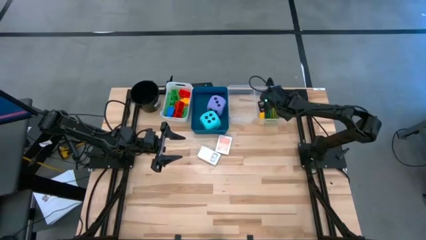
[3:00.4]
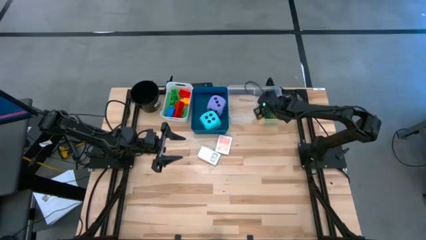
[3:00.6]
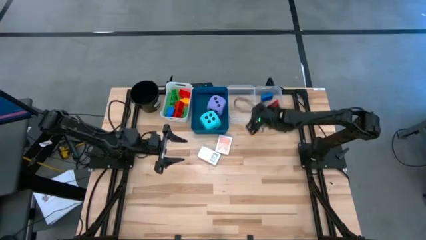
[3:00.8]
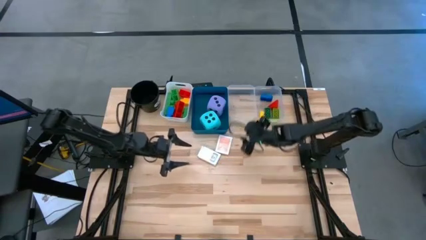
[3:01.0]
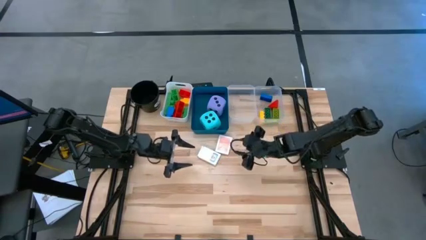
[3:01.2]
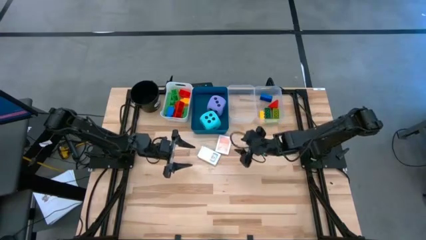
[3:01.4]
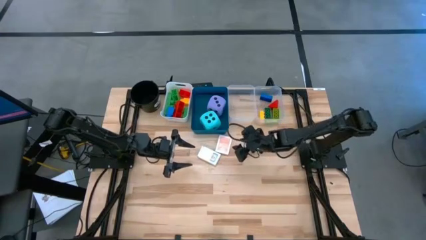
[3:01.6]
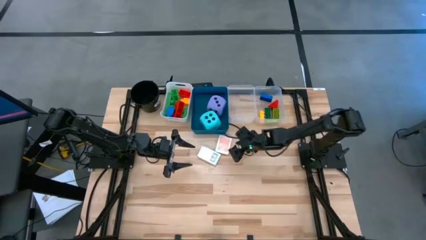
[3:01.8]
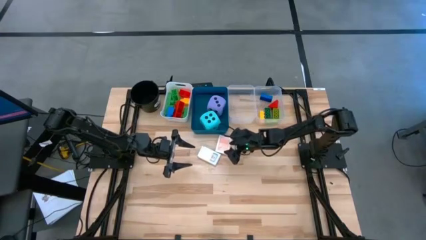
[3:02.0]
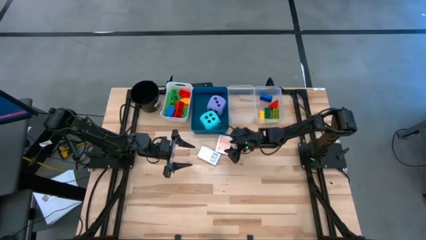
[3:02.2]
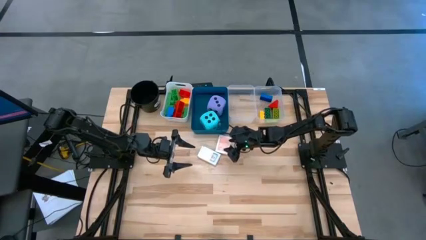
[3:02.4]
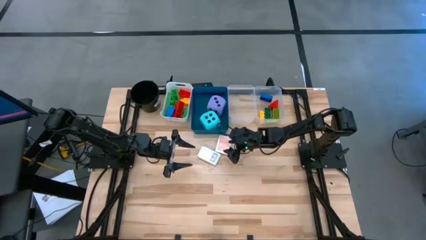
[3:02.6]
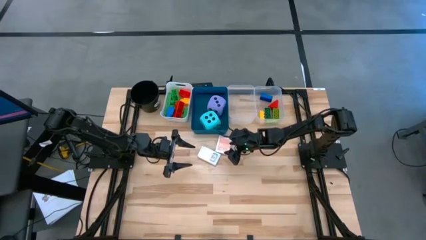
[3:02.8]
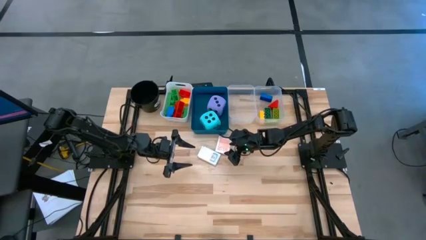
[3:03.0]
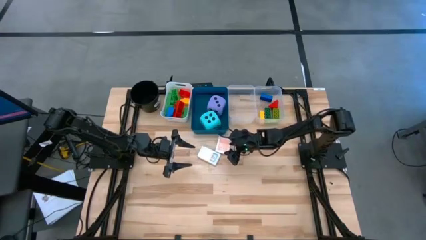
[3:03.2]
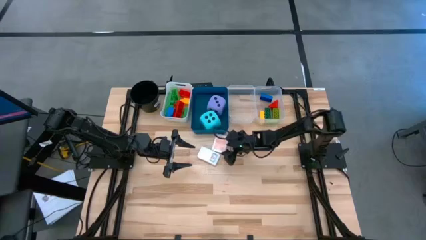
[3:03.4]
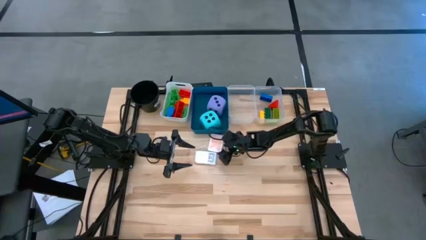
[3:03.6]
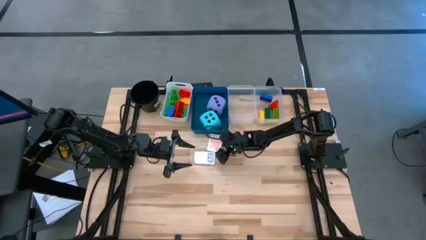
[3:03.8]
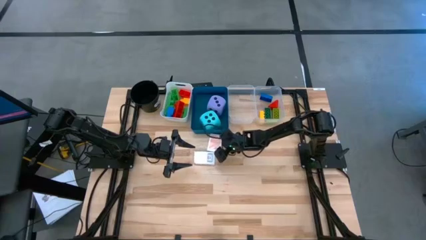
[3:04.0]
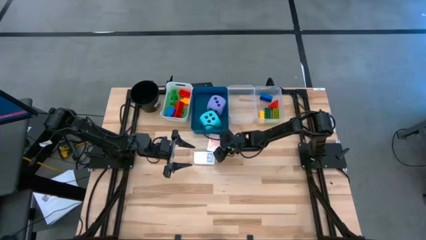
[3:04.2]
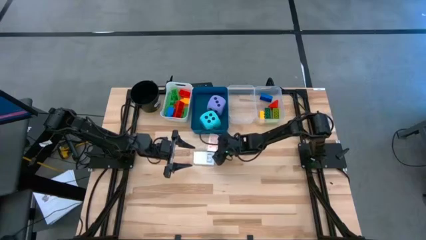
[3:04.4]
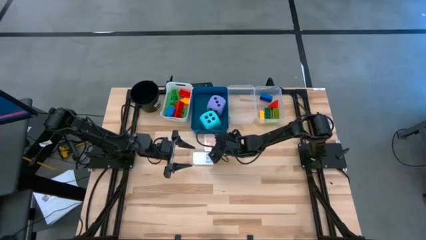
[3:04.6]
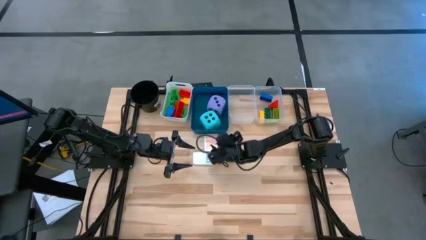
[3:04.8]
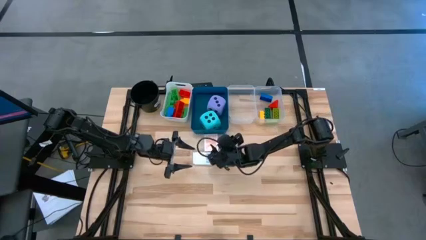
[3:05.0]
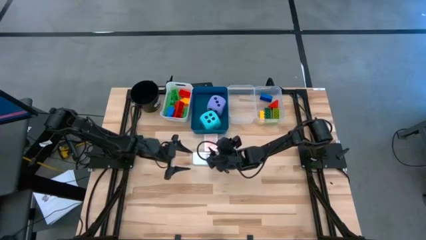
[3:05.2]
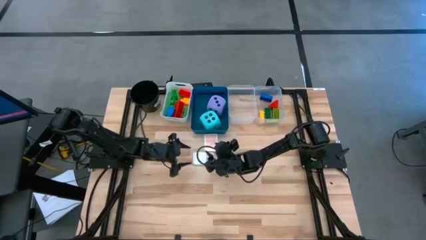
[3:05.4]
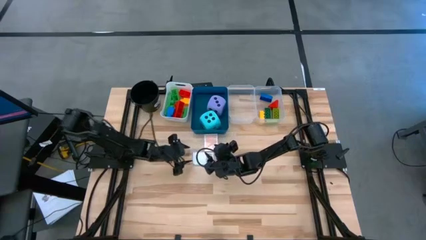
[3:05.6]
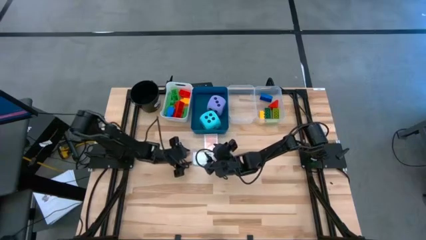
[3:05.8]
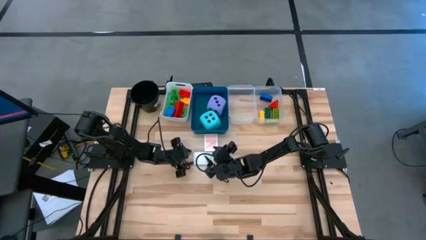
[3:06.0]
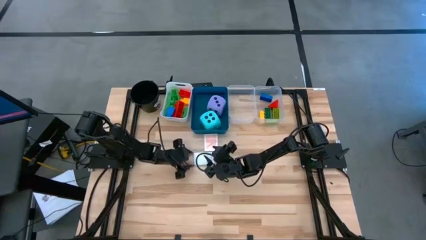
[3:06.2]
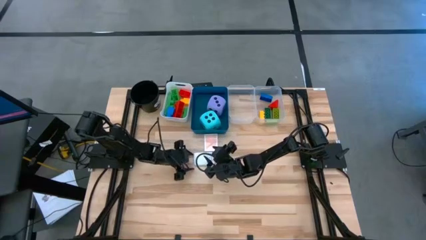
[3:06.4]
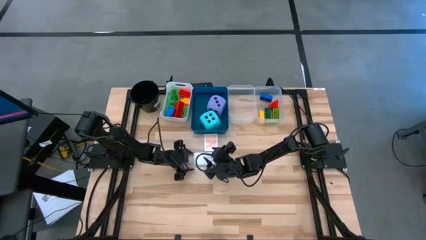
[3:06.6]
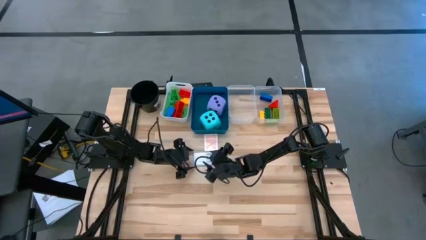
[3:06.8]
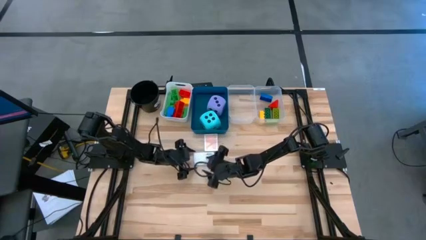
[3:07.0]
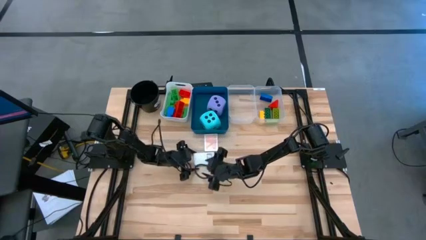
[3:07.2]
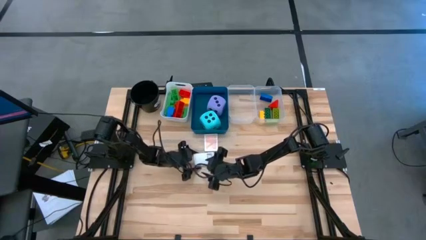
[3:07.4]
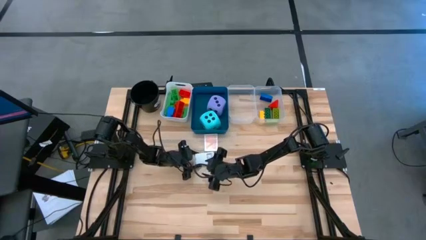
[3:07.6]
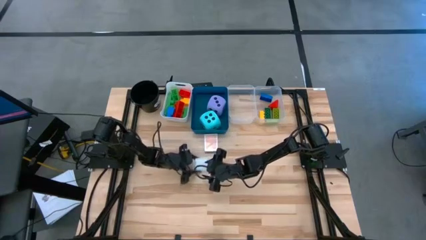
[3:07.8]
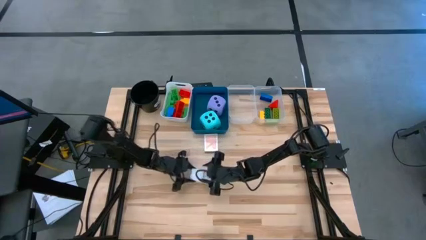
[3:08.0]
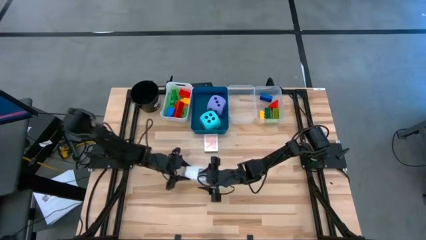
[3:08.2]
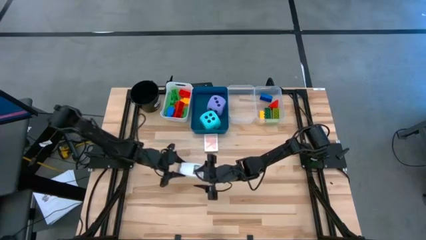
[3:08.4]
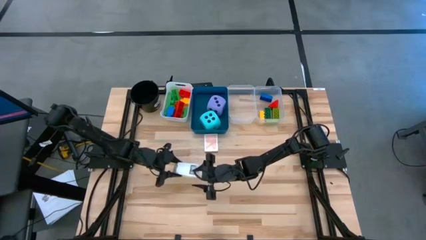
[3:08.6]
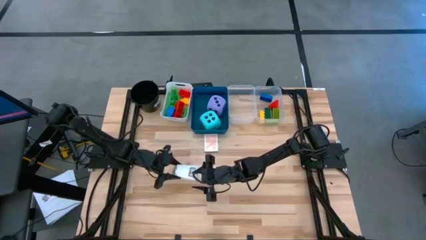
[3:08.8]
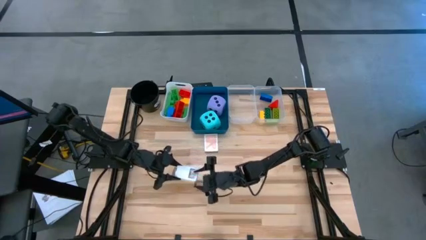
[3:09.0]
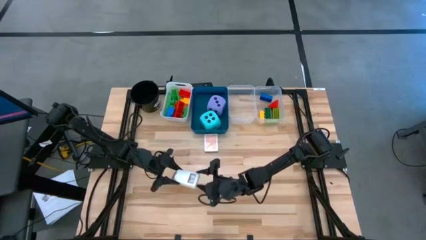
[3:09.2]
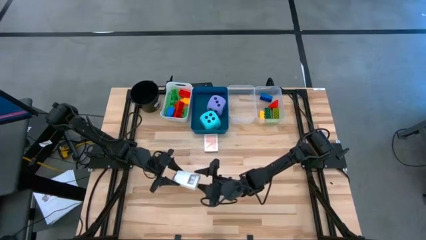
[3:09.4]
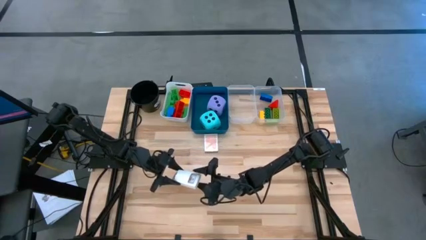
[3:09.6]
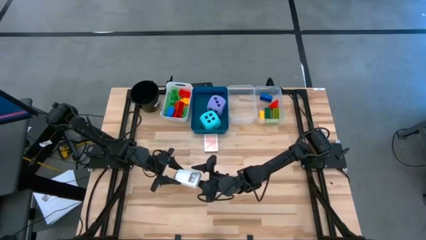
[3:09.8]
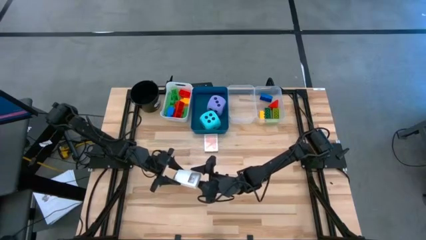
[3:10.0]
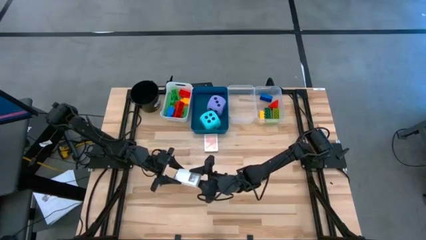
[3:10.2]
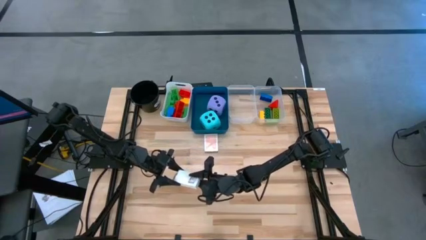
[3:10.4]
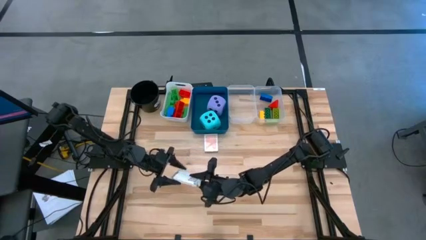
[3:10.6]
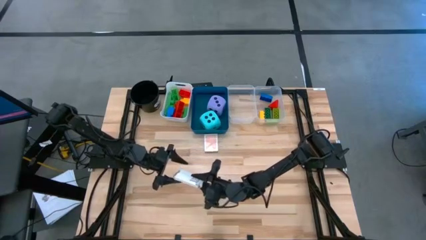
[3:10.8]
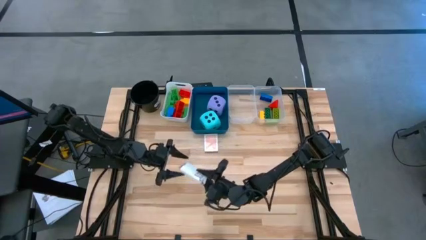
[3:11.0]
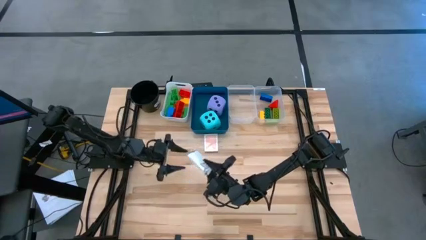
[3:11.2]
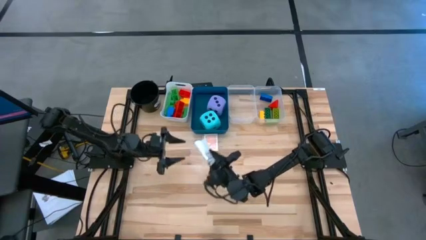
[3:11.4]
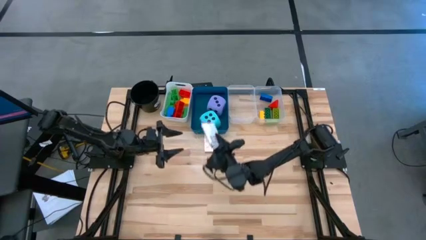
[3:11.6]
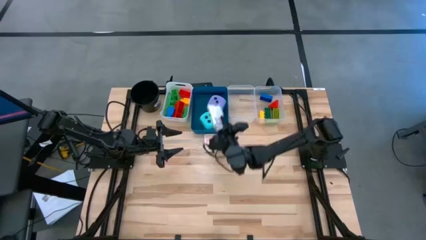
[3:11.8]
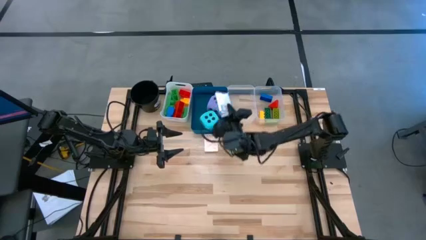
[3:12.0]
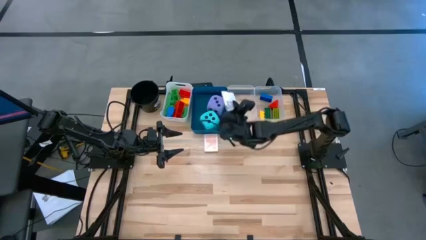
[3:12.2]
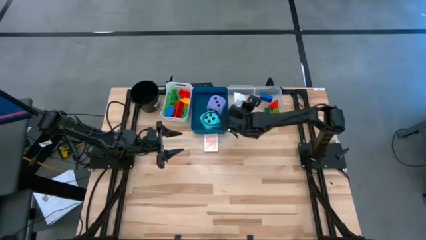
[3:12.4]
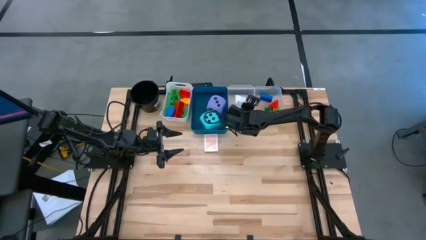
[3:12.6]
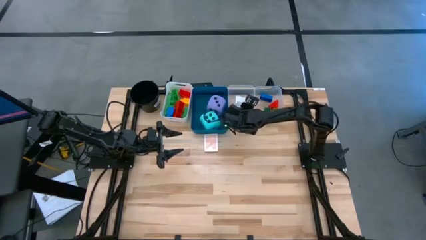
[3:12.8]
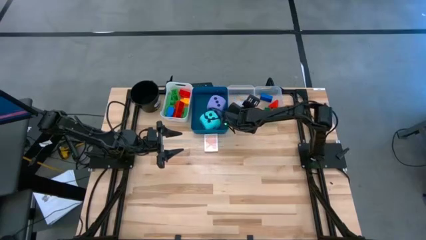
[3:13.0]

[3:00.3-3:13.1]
Task: Pick & Place Toys
Put the blue deck of cards into the left transparent bin

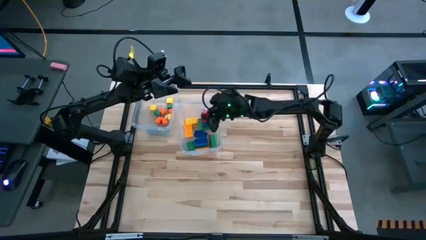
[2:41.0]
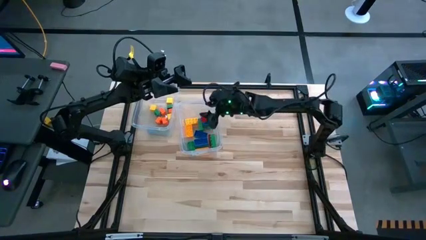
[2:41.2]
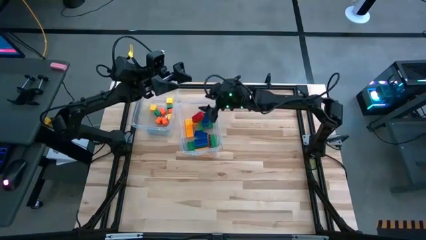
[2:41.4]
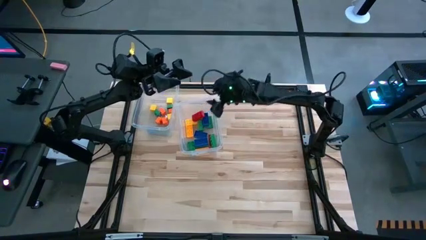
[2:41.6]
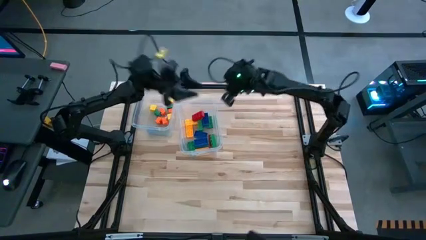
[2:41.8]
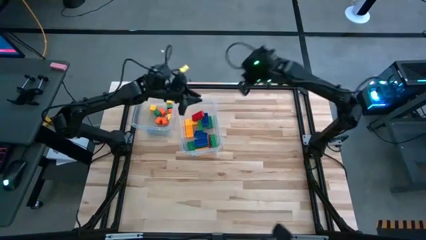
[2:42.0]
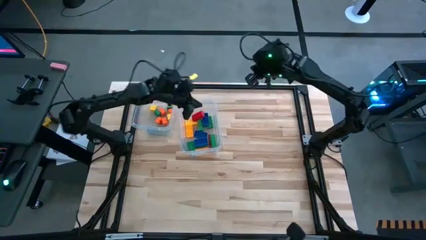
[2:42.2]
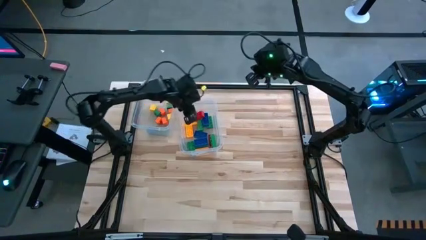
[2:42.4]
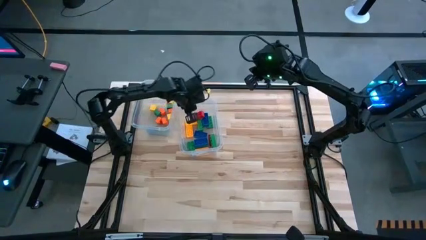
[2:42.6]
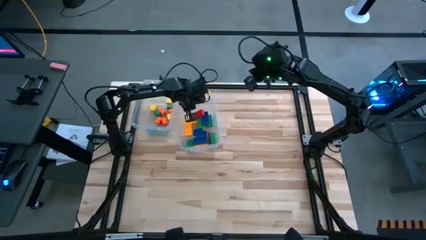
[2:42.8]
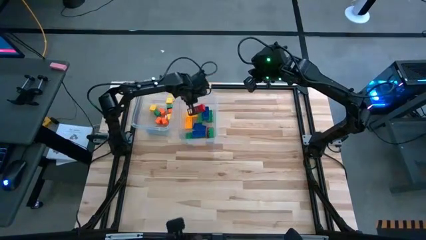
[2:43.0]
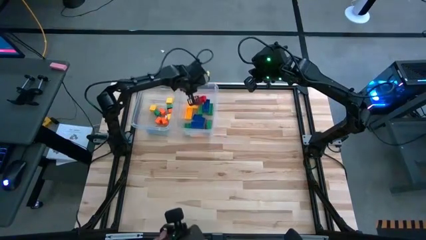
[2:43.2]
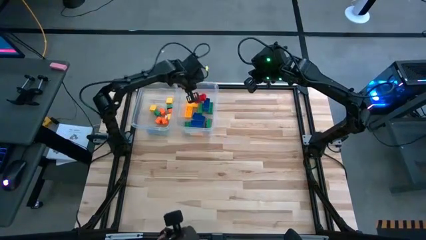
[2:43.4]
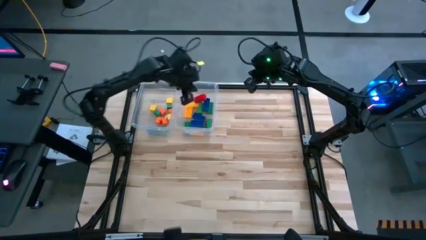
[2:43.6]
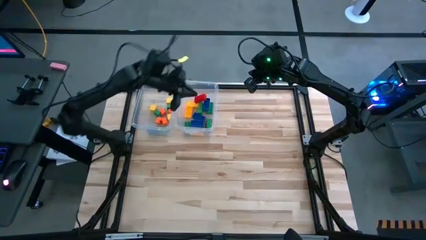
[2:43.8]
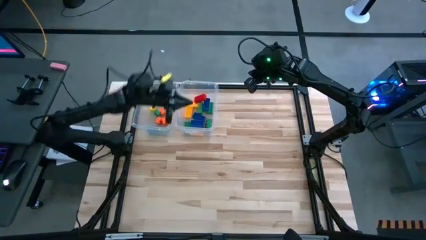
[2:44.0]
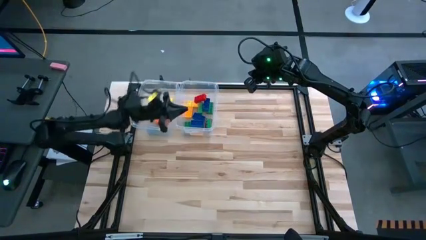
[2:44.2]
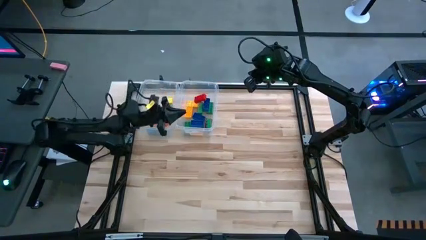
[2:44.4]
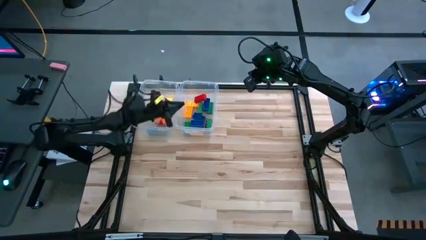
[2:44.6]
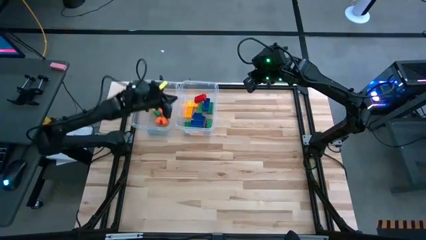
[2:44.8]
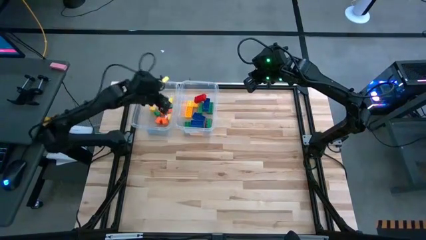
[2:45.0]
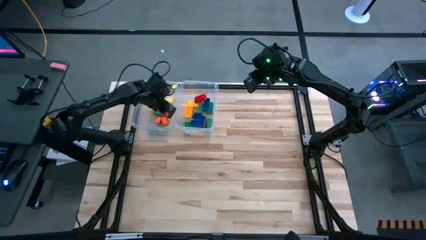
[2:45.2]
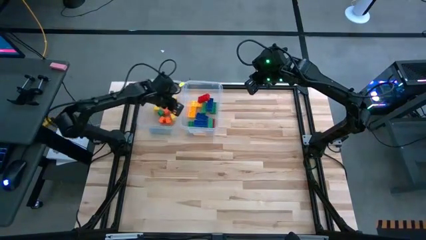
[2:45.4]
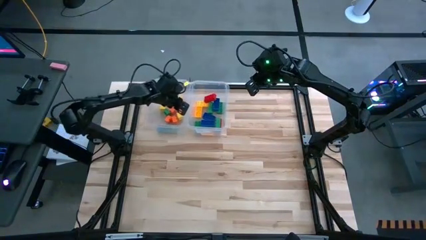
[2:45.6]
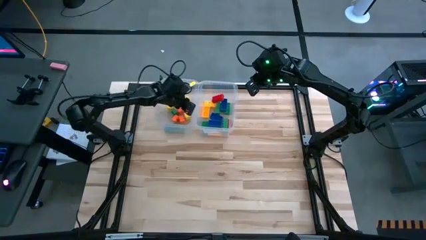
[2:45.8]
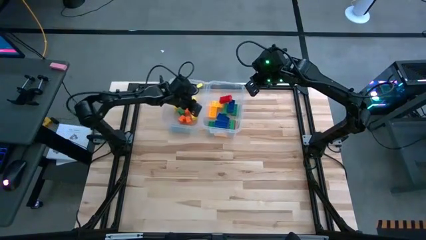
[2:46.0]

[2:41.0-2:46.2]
Task: Sort blocks by size
Adjust the transparent bins to the top center of the table
